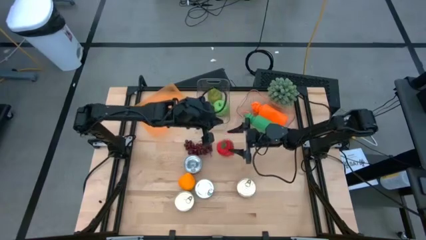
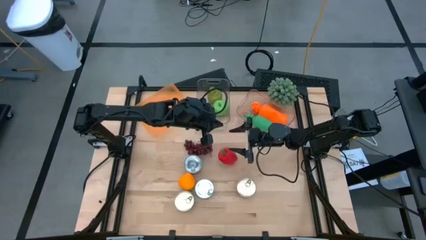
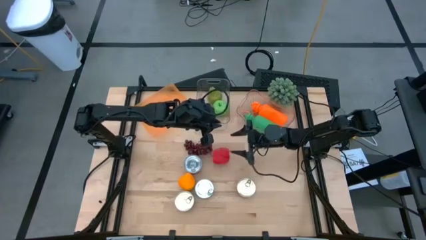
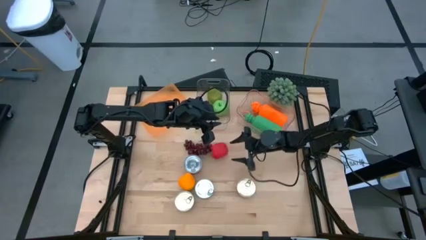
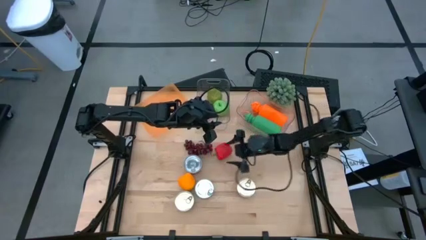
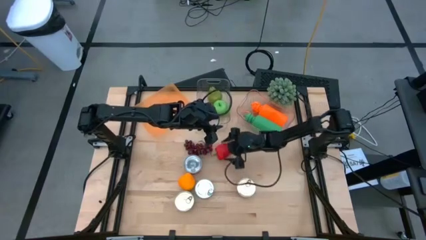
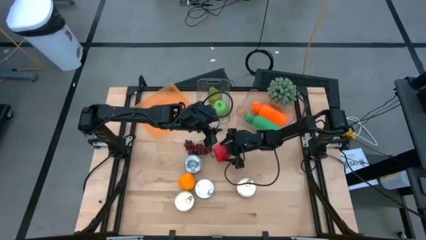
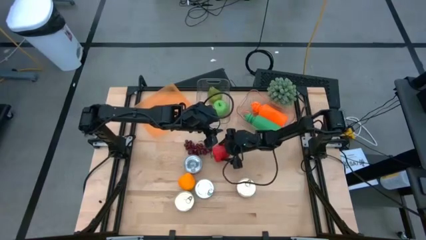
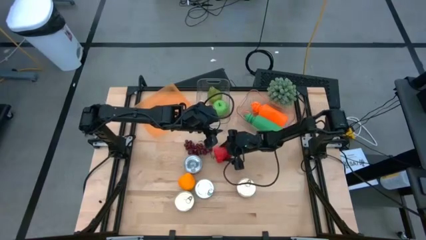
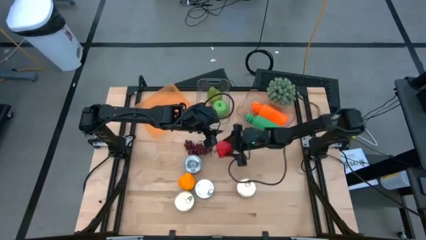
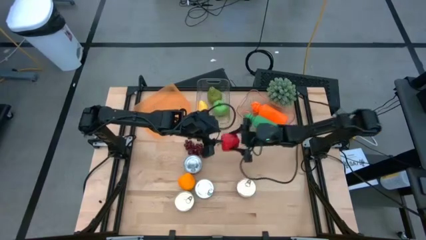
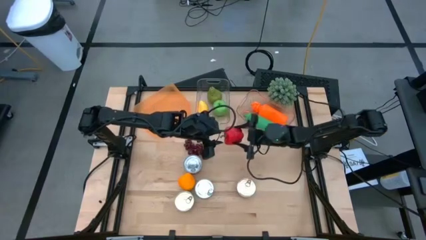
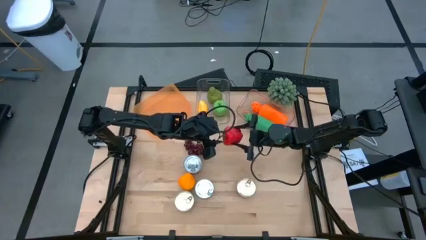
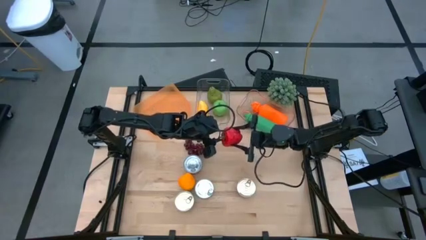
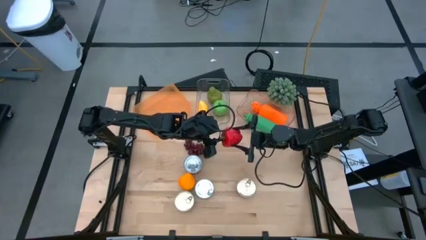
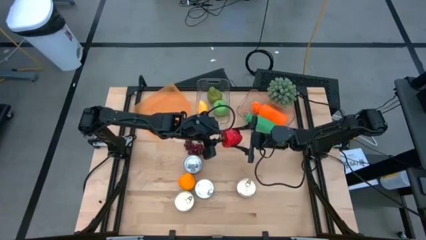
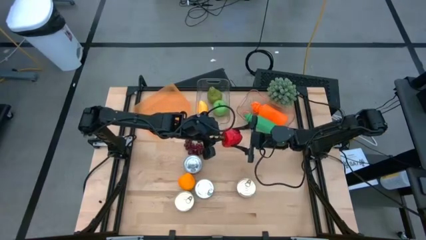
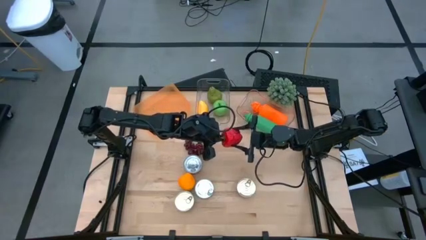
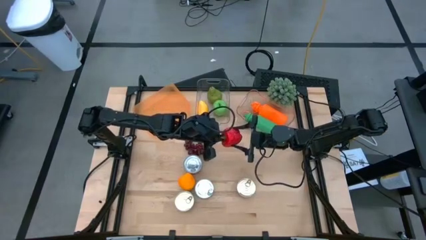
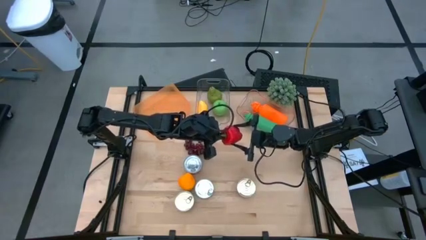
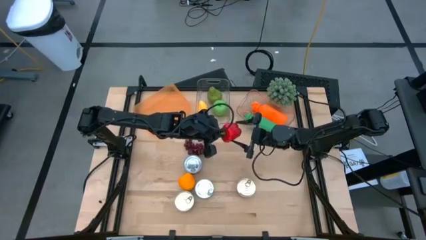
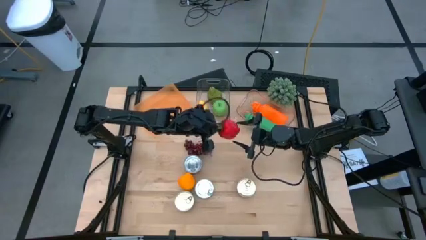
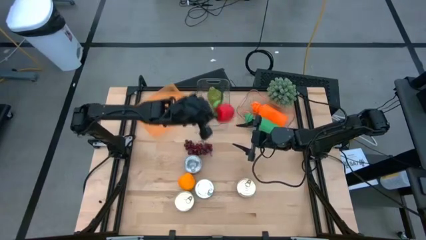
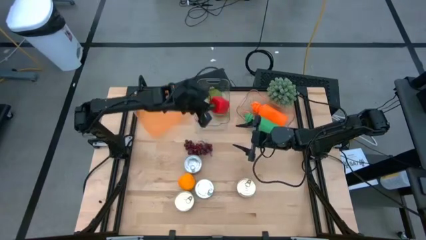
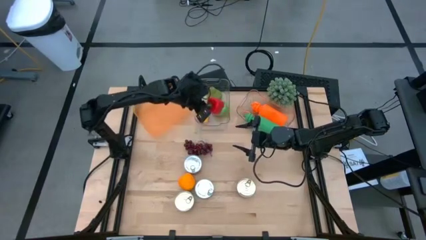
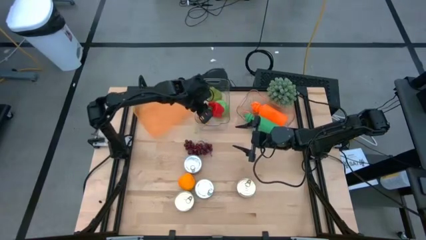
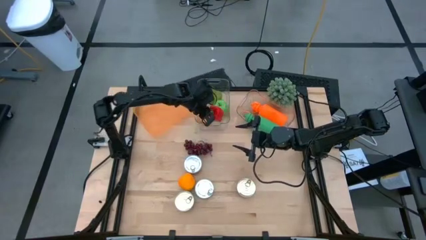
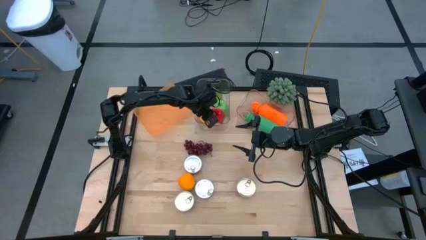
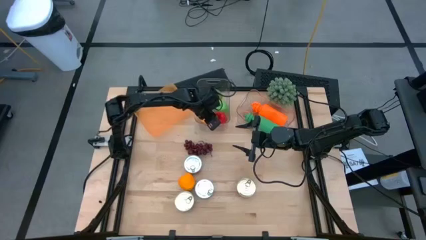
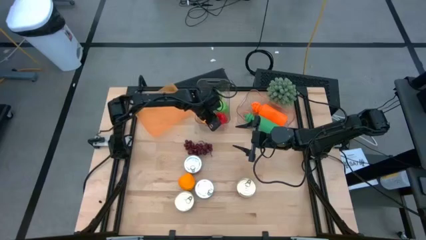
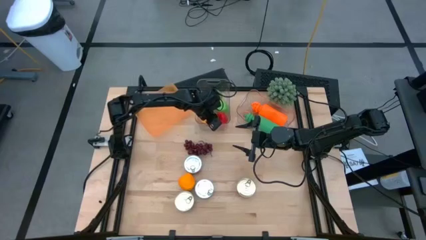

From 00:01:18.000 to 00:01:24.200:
Task: Pick & Place Food Item
Put the red bell pepper into the left transparent bin

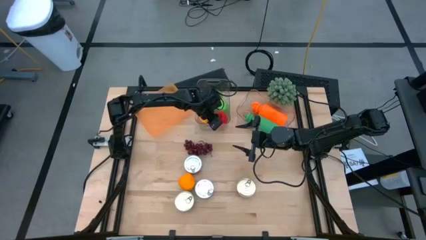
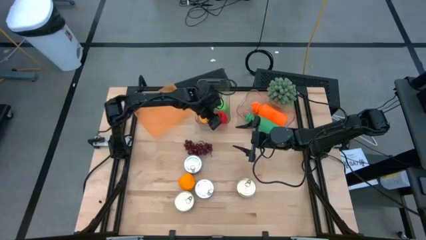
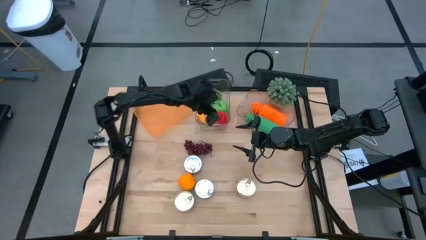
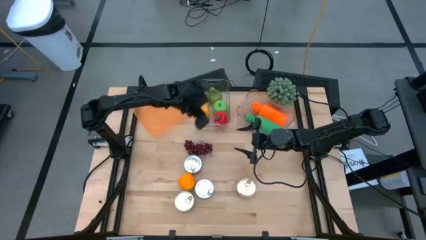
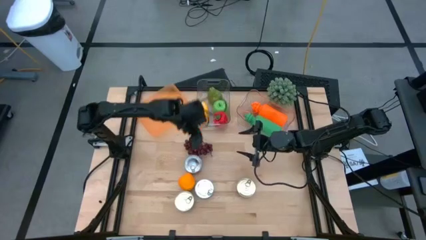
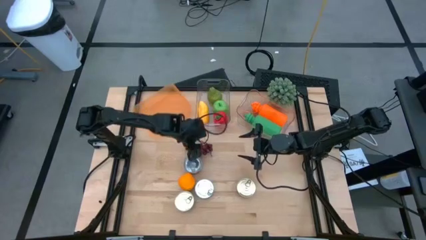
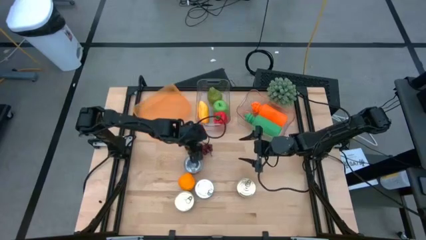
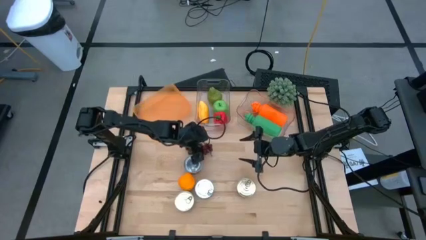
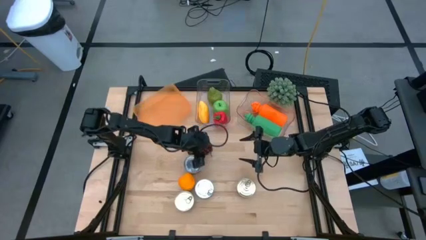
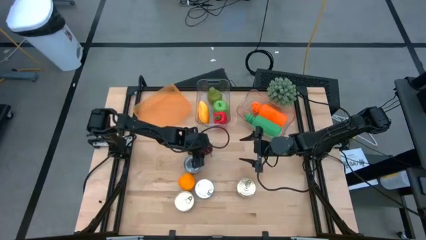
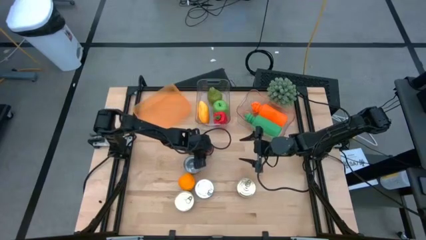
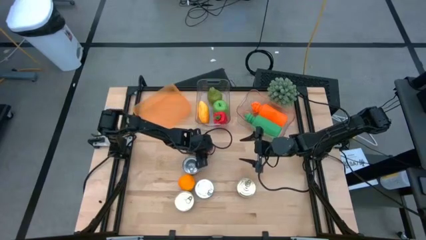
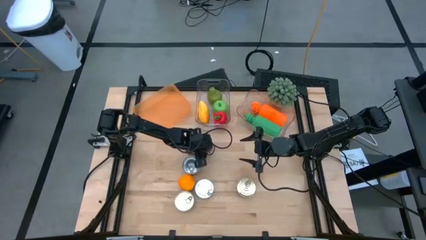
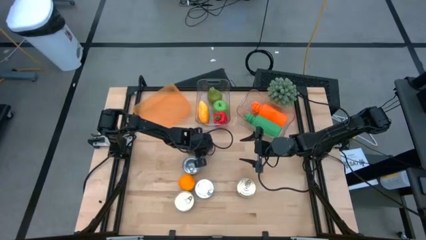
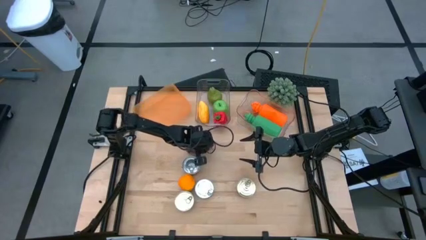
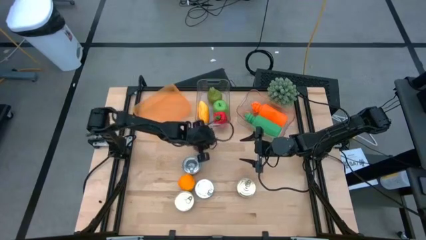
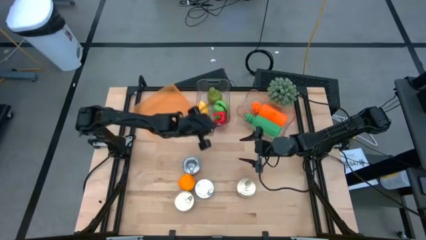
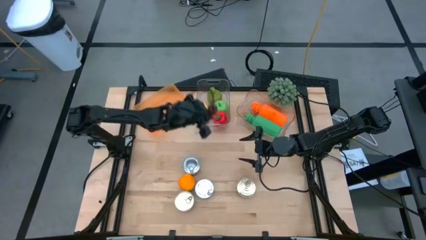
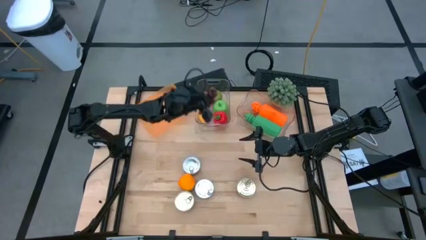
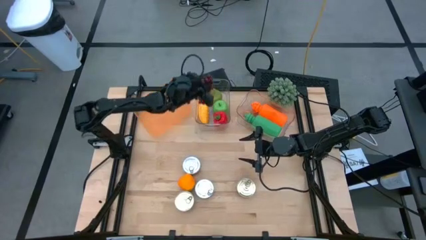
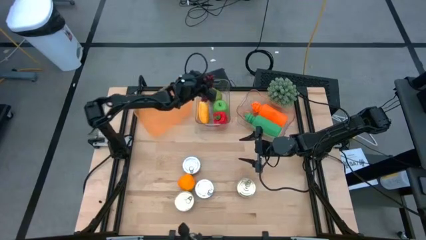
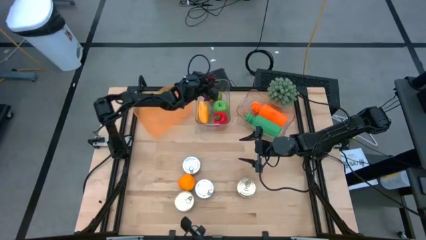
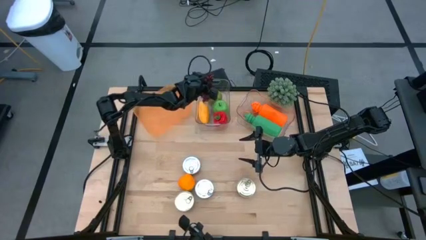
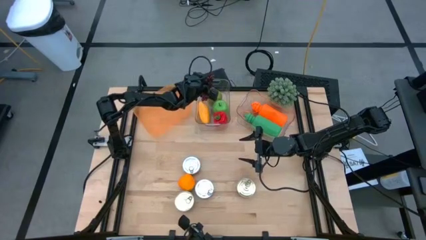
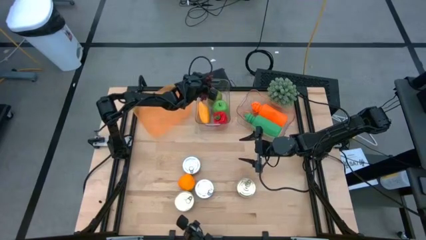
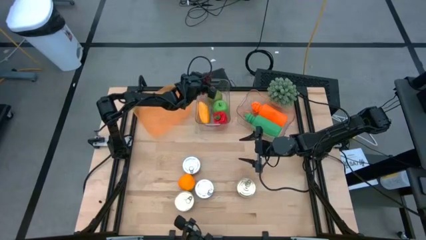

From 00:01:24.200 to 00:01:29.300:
Put the grapes into the left transparent bin

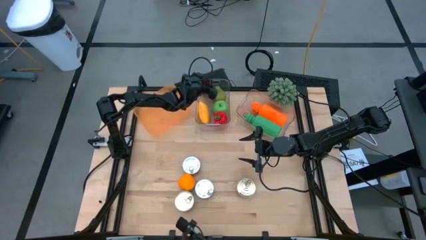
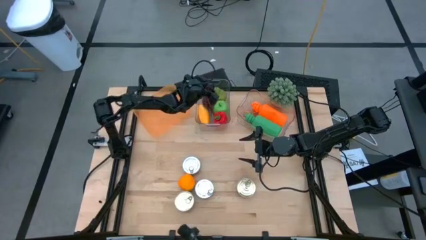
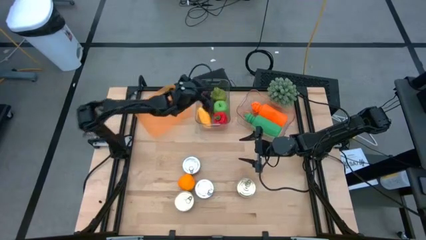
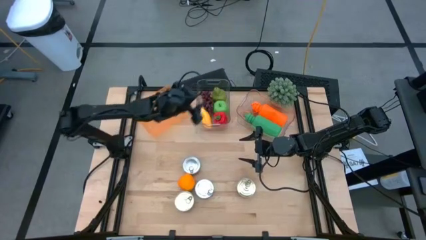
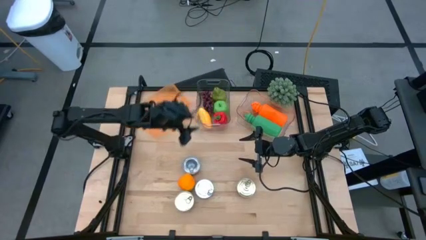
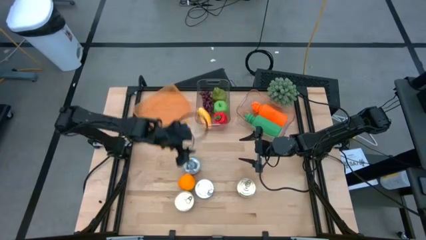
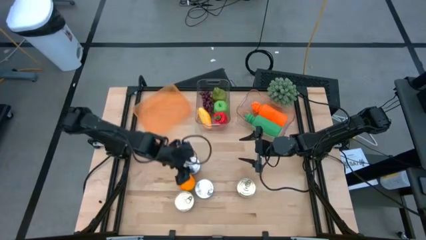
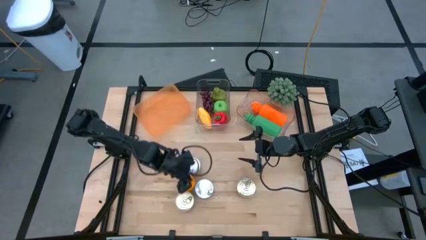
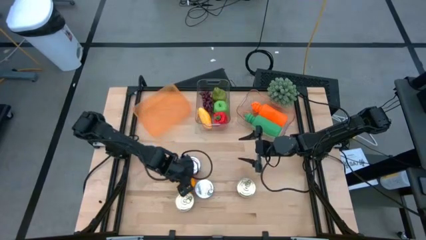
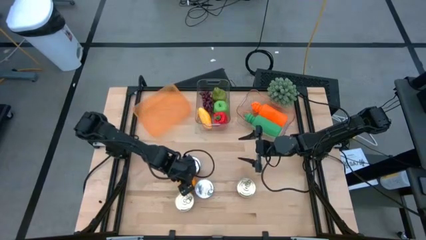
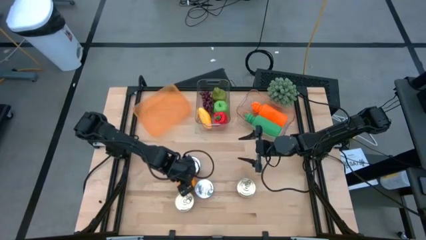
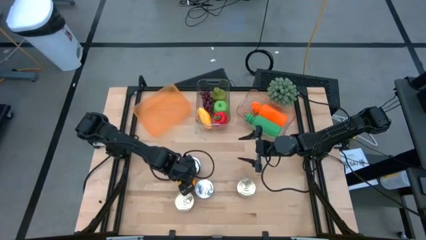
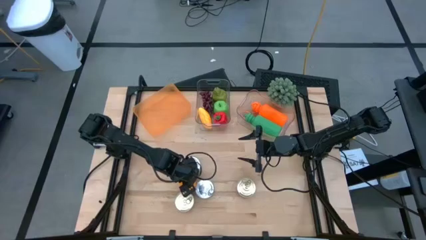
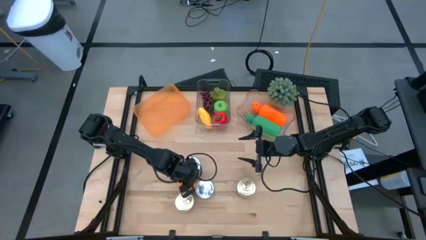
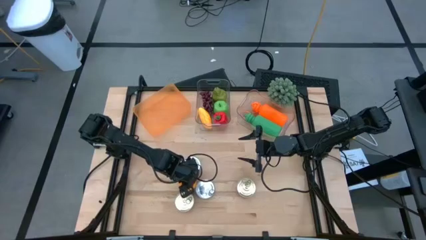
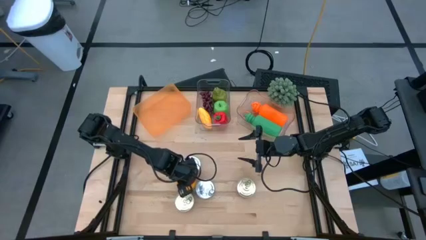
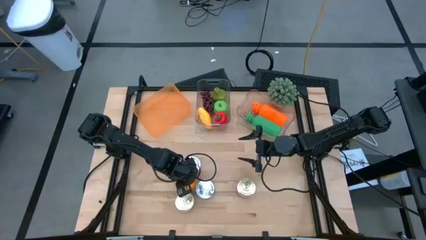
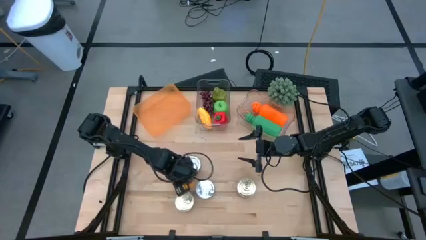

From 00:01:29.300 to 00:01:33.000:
Put the orange into the left transparent bin
